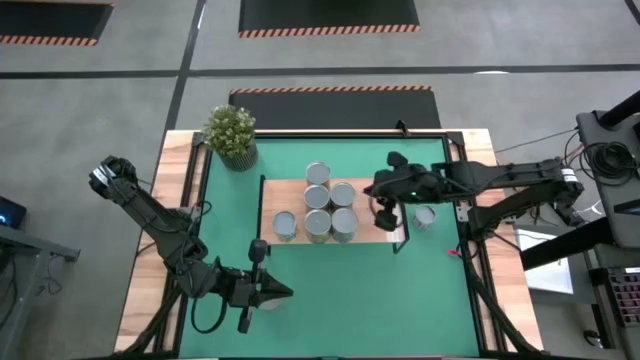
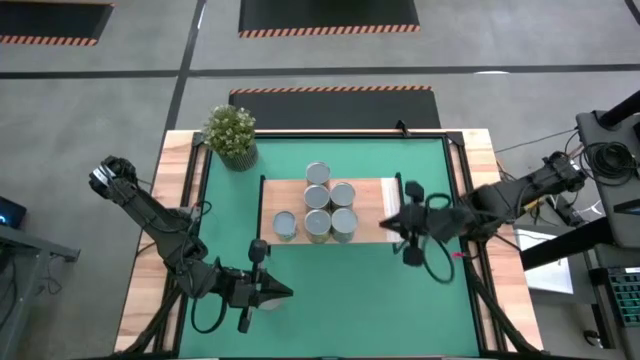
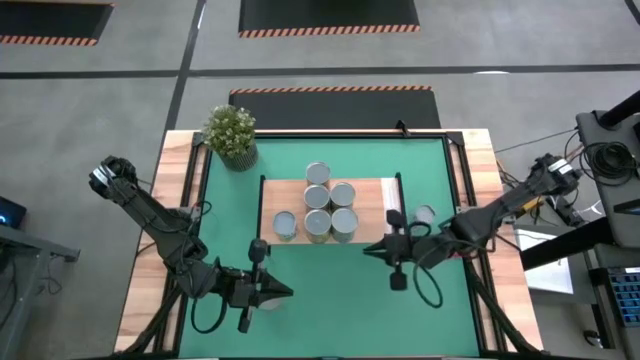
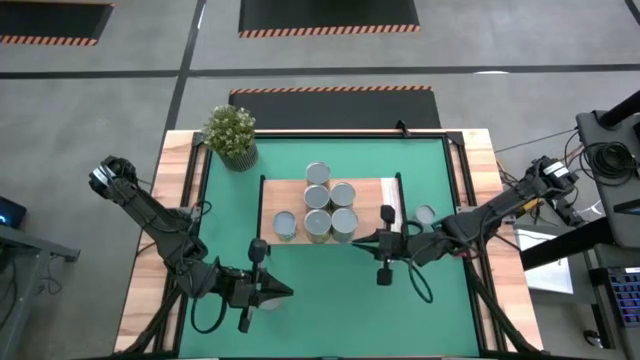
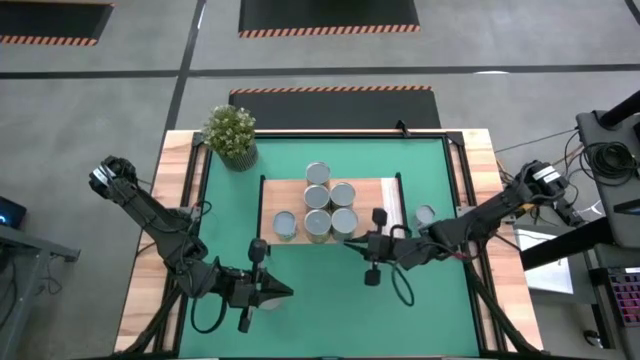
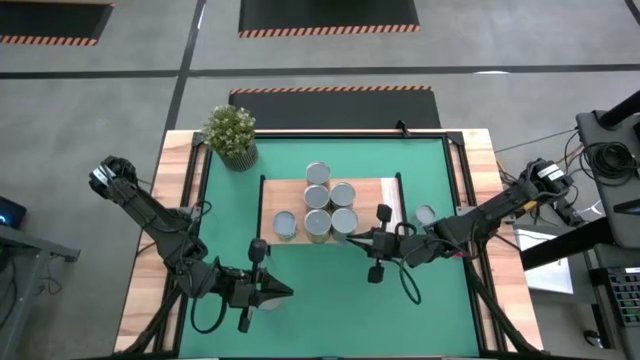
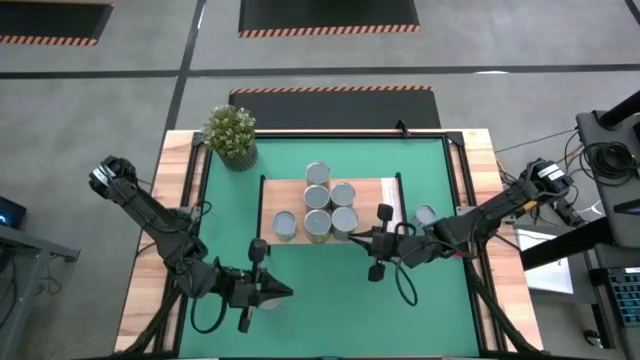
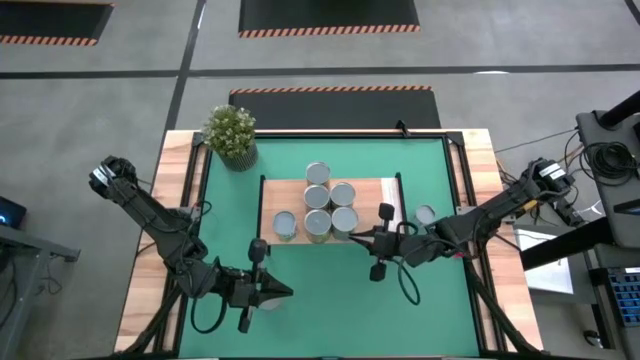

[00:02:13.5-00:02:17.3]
Task: Pick and place cans onto a shelf
Adjust the canned cherries on the shelf

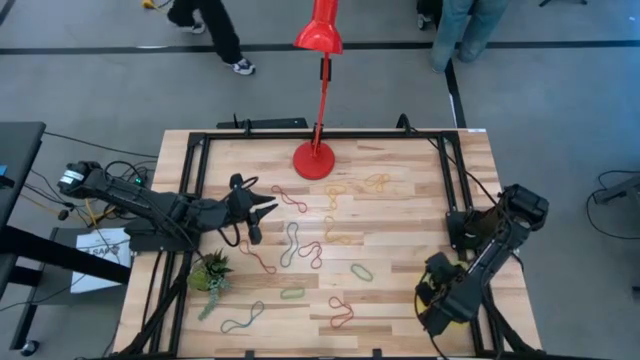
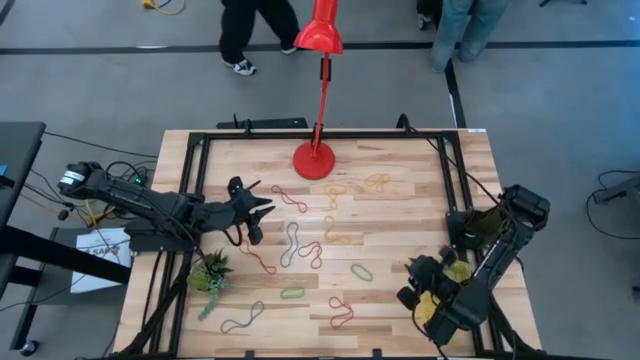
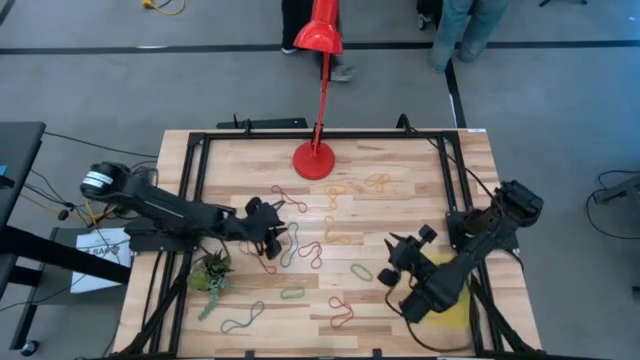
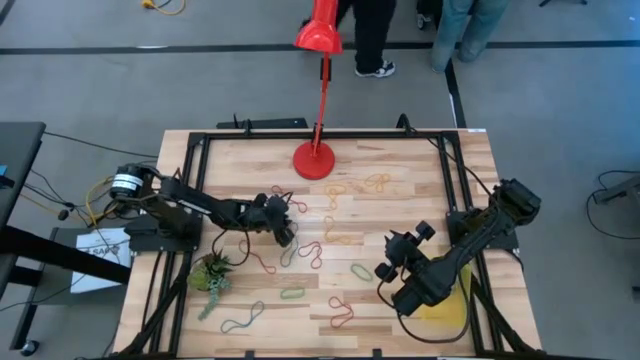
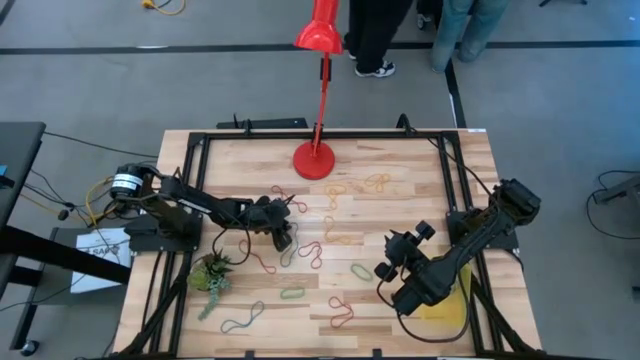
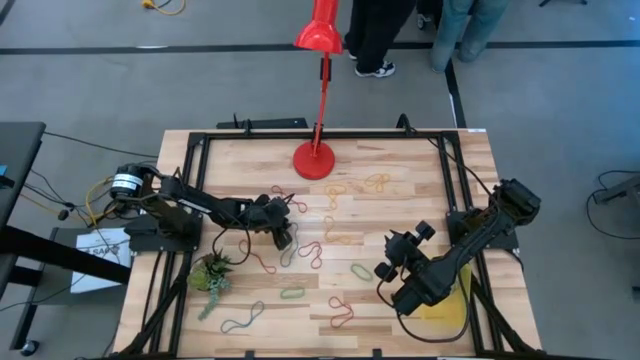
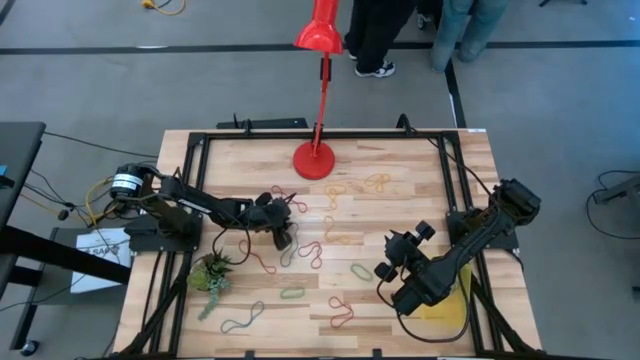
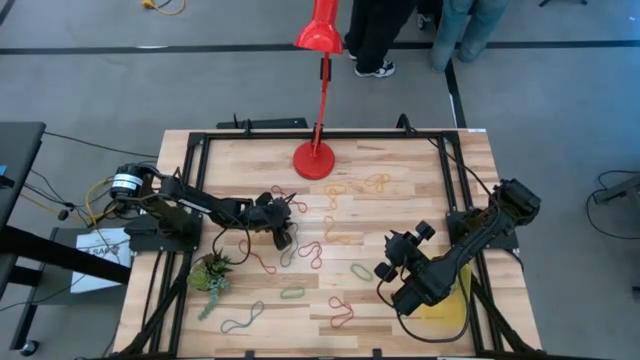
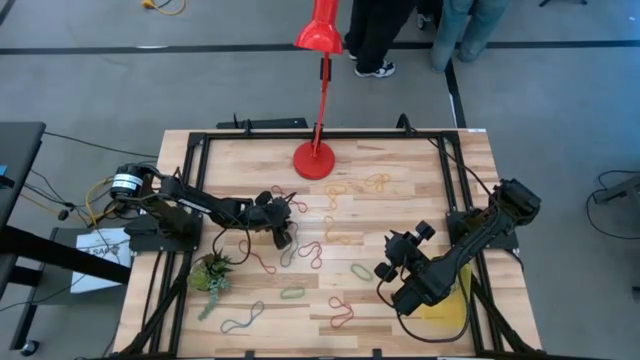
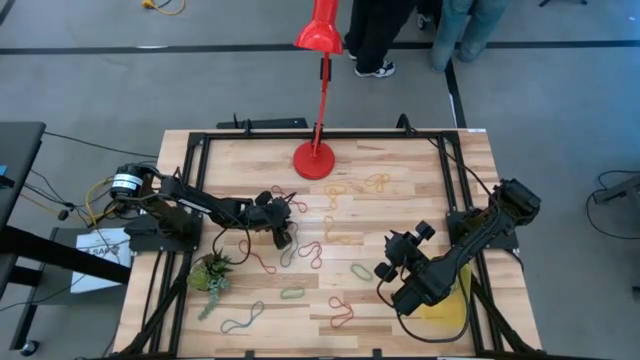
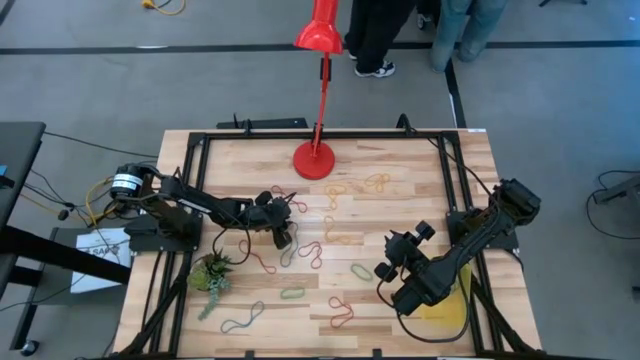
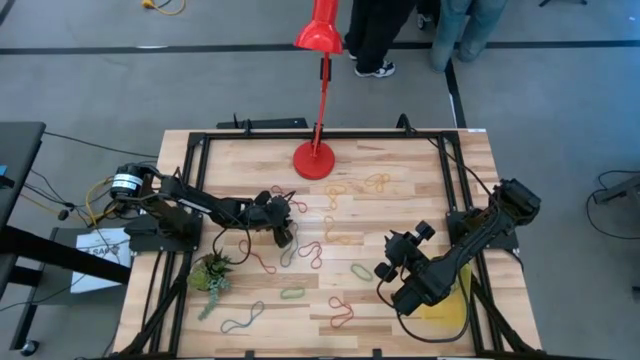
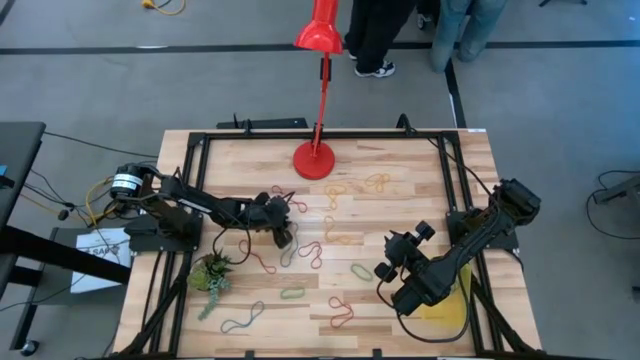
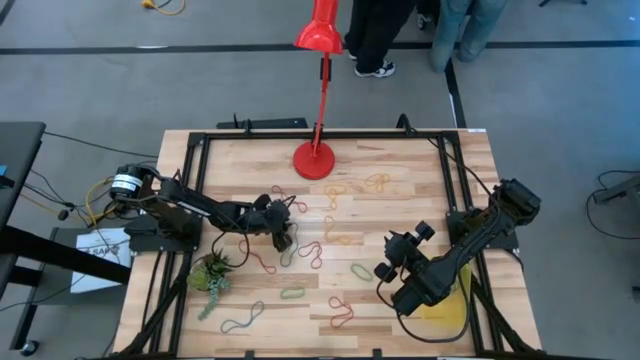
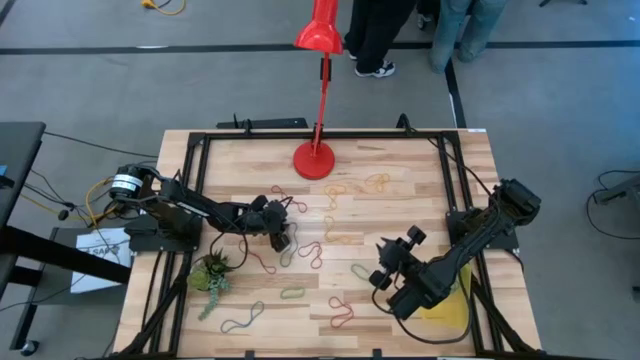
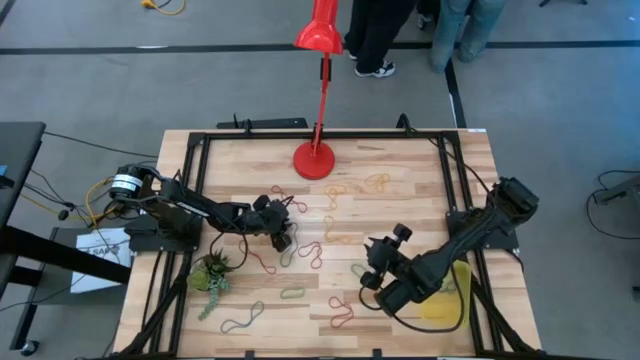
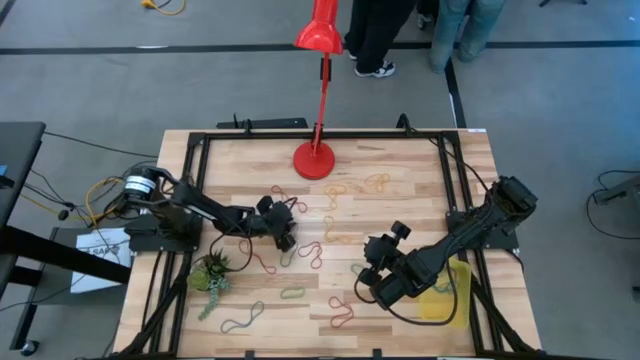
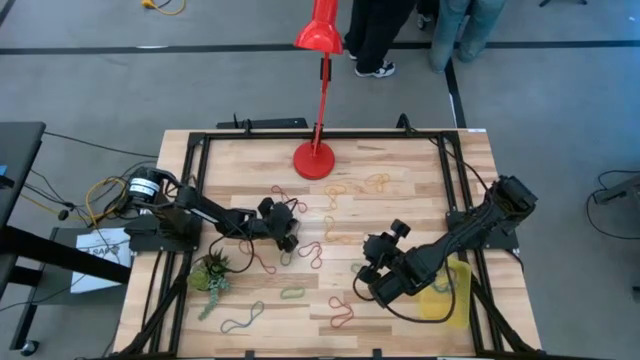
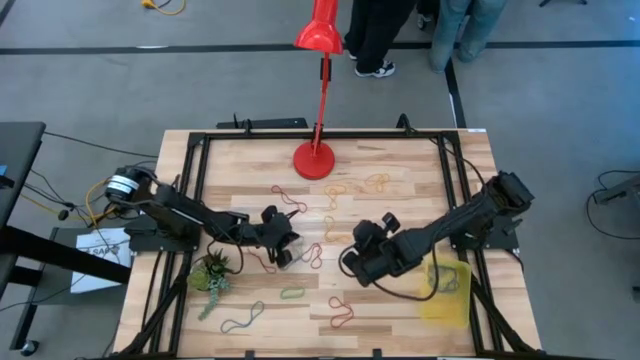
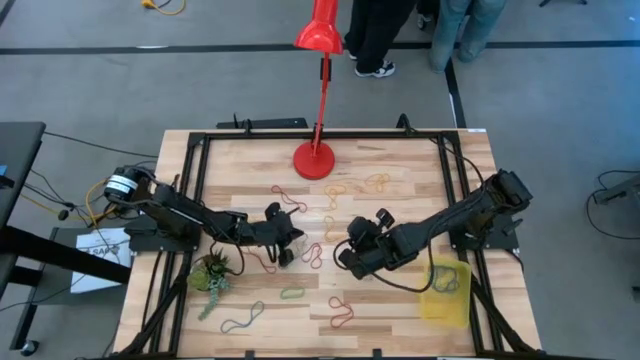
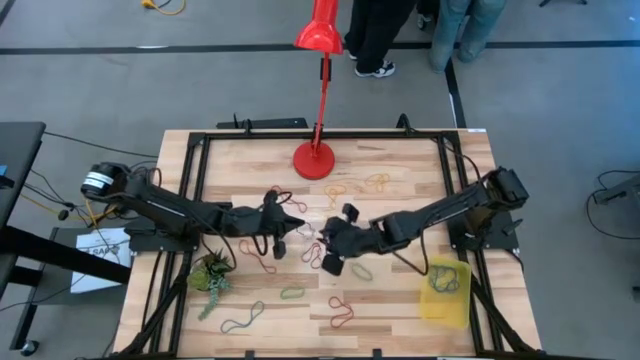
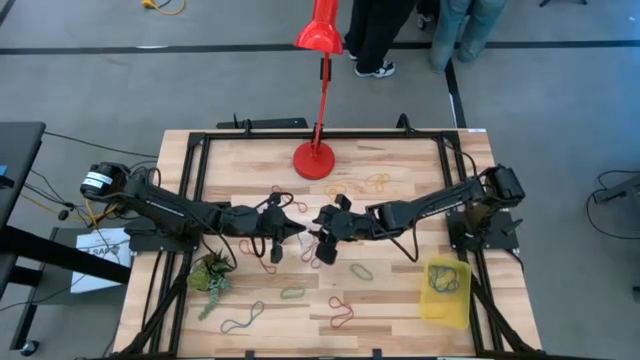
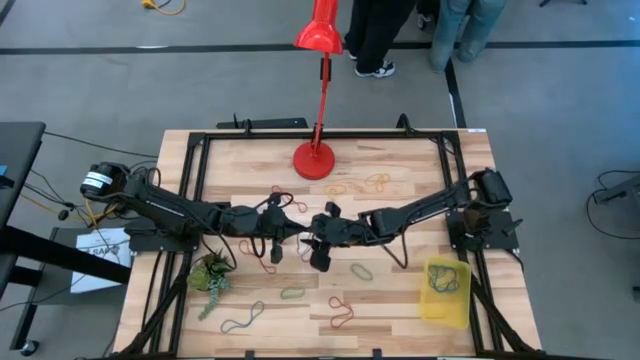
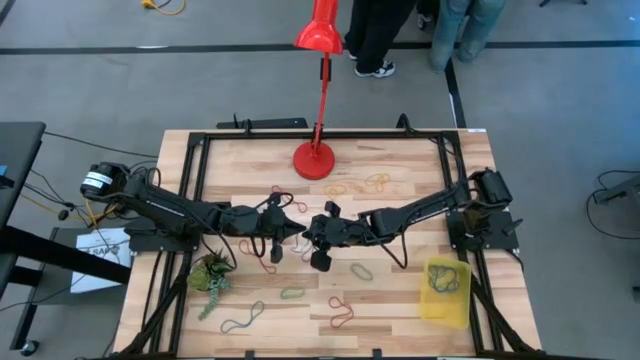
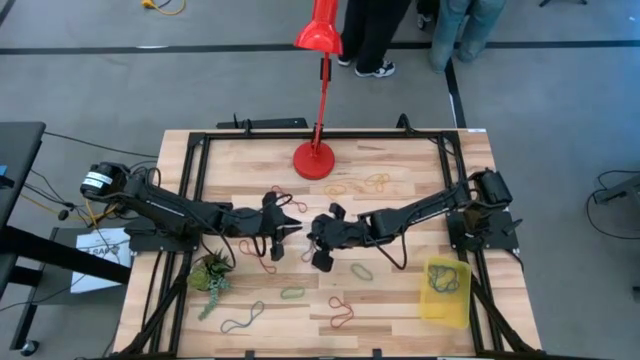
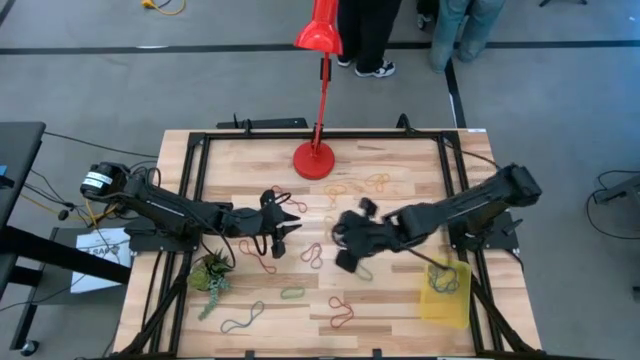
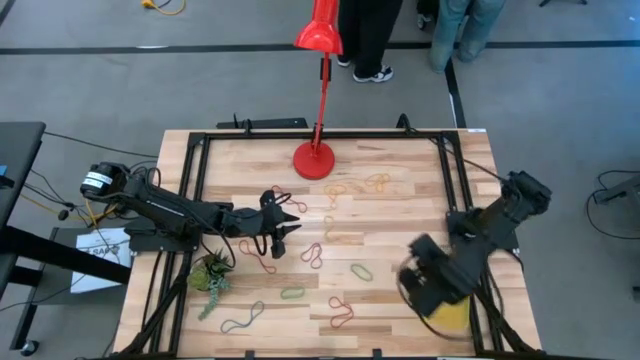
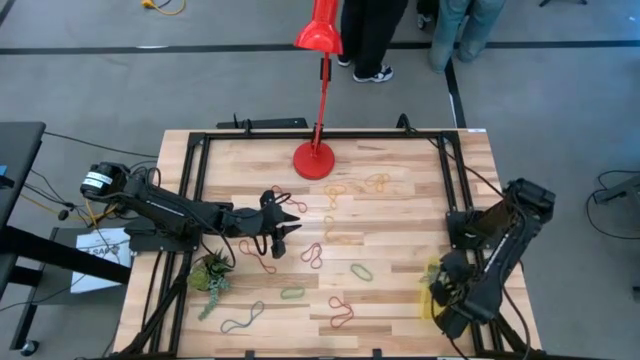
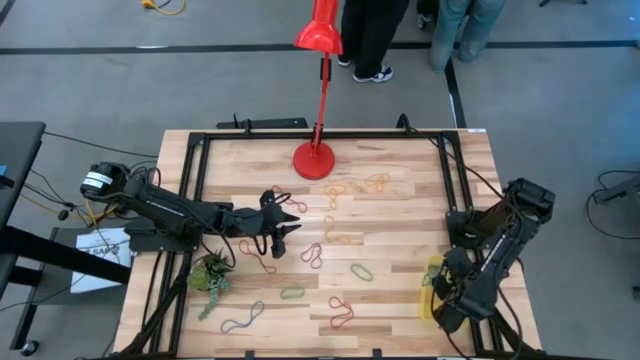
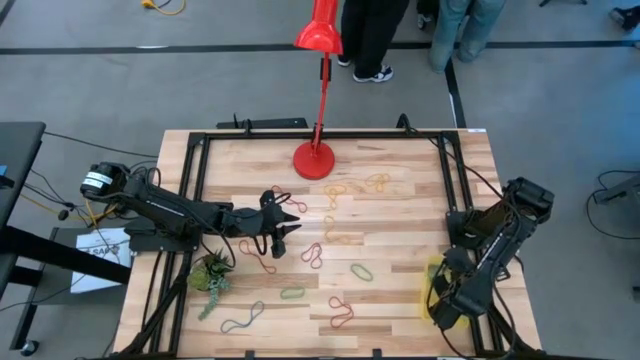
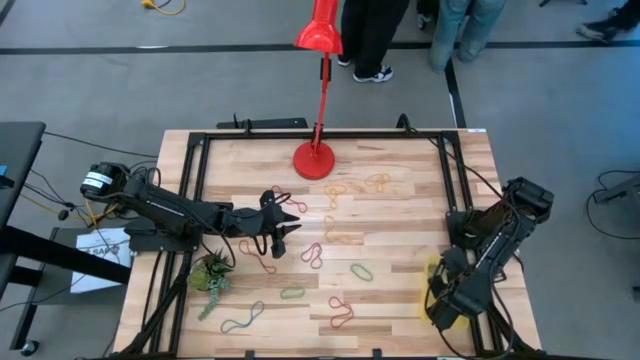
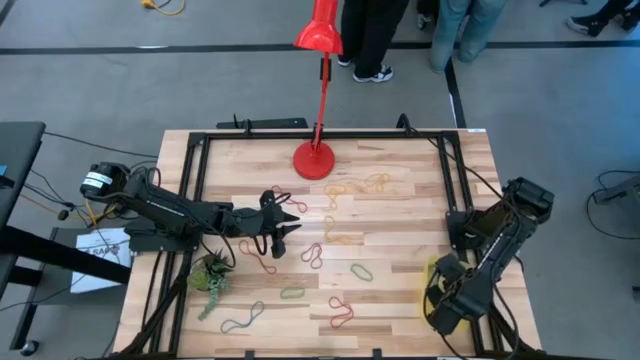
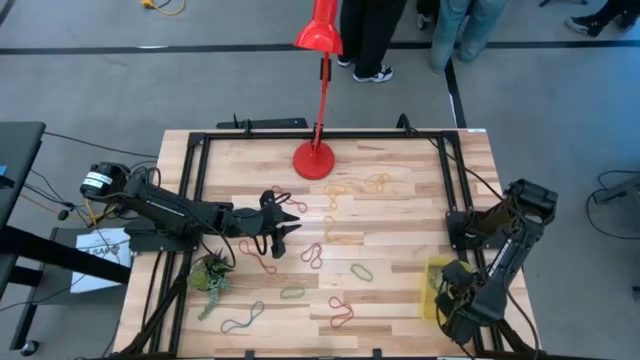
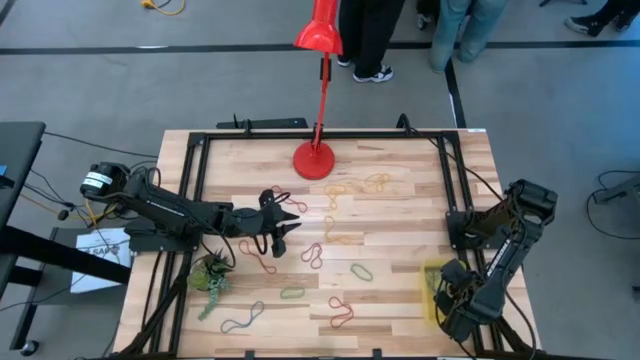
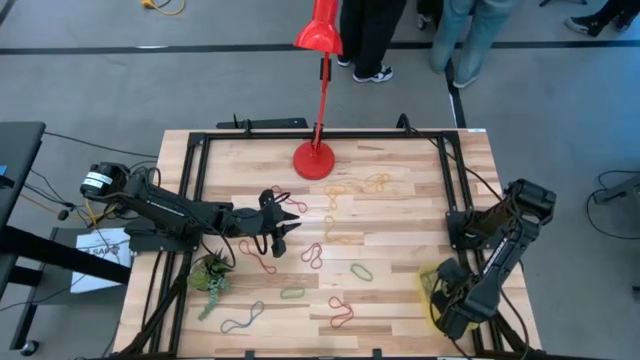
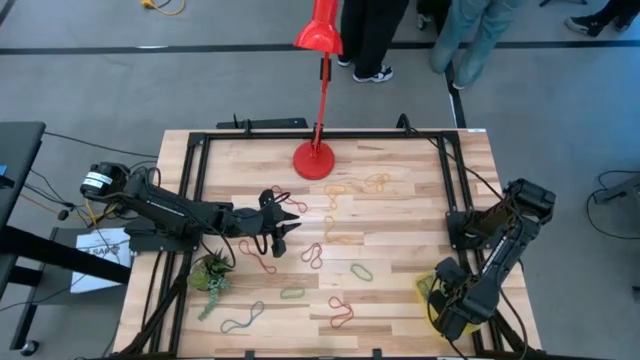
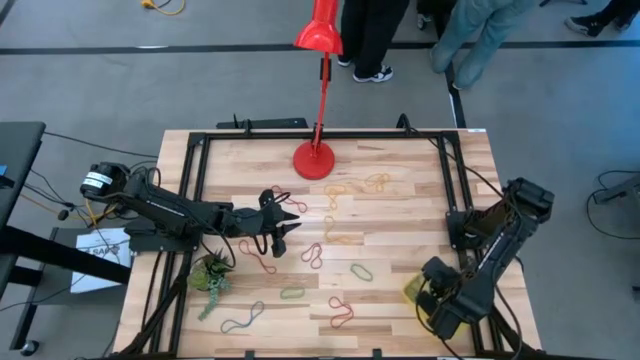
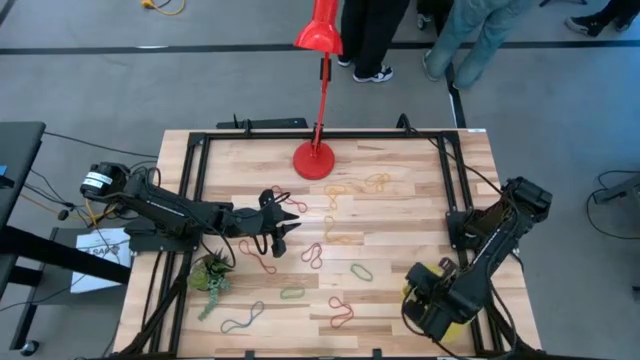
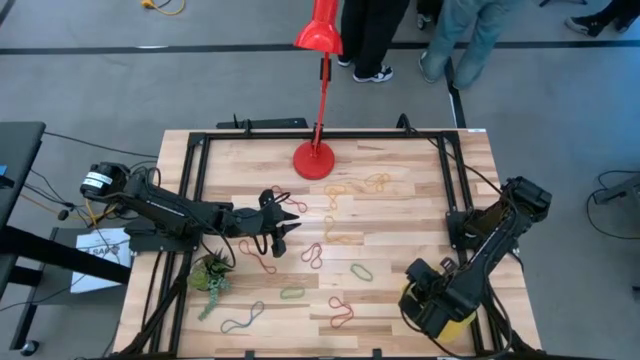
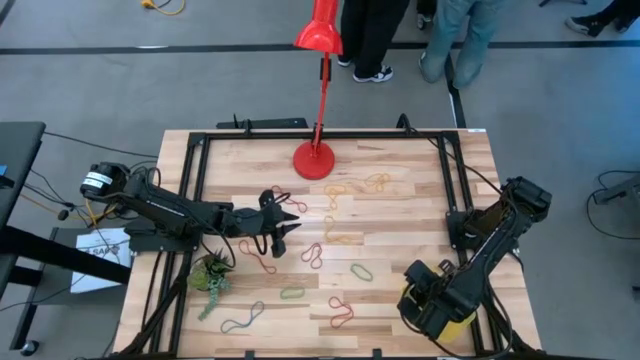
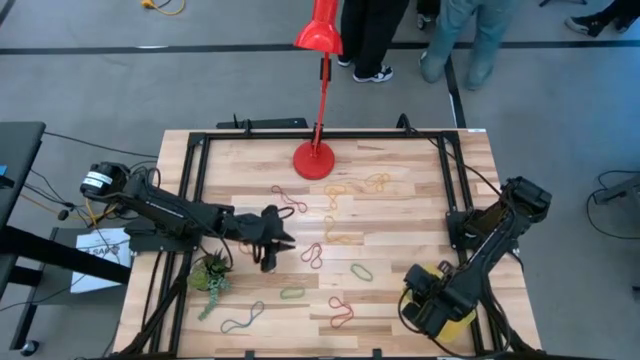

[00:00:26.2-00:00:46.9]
Task: Pick and place rubber bands into bin
Put the blue rubber band into the container
